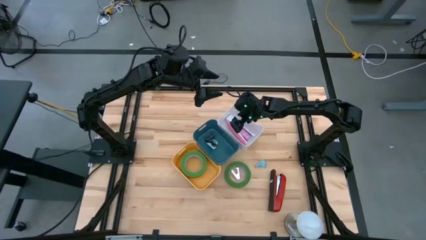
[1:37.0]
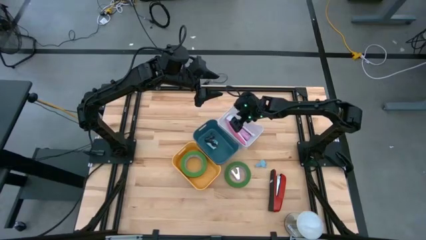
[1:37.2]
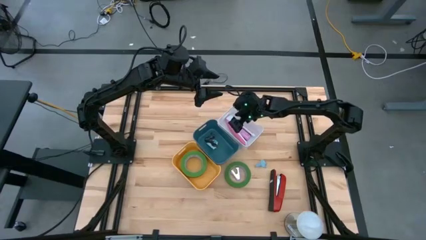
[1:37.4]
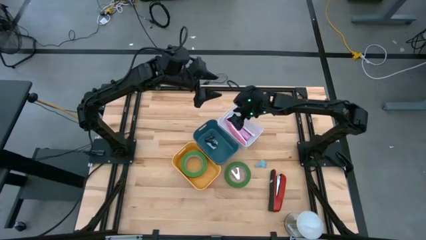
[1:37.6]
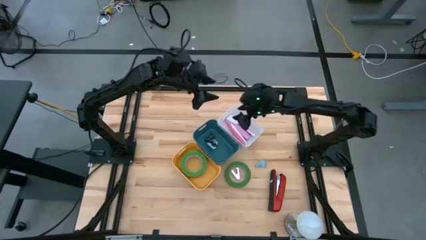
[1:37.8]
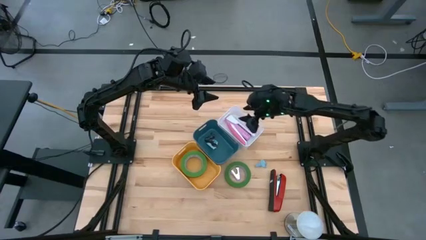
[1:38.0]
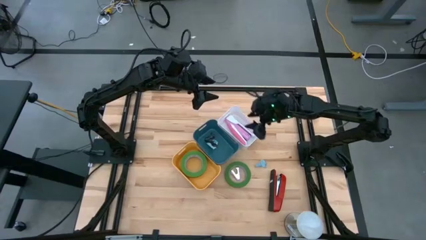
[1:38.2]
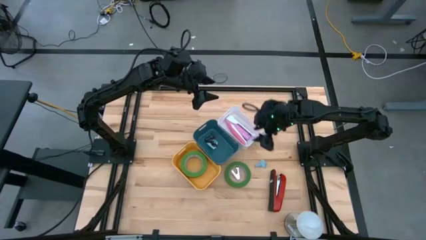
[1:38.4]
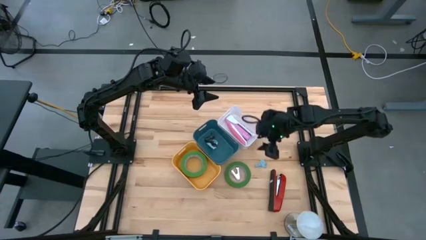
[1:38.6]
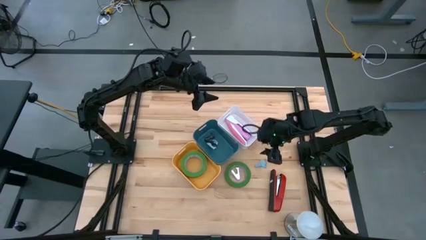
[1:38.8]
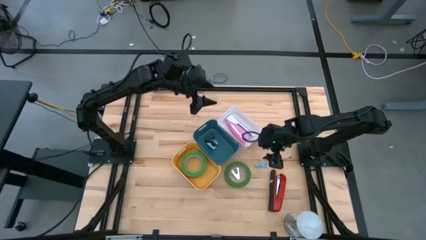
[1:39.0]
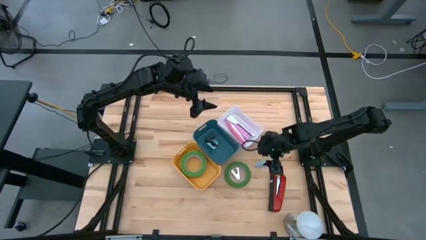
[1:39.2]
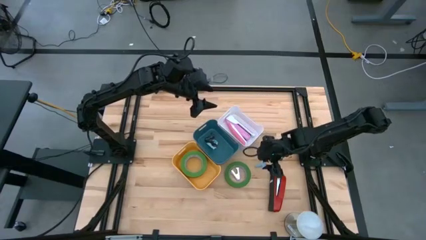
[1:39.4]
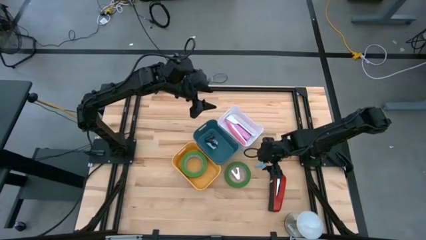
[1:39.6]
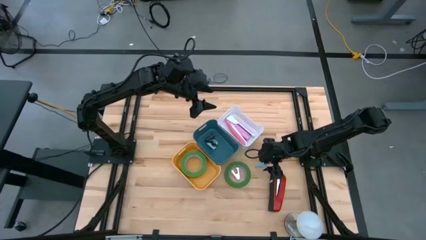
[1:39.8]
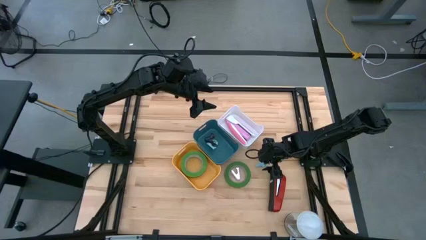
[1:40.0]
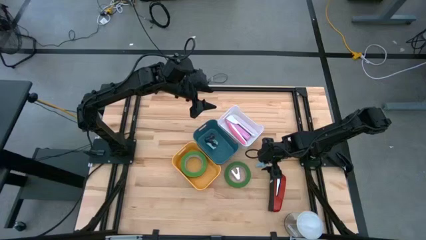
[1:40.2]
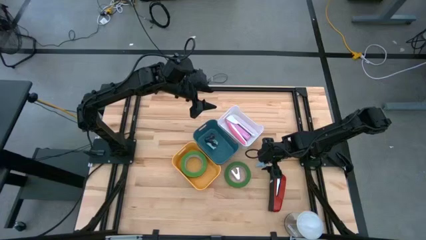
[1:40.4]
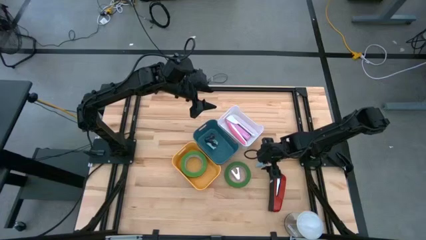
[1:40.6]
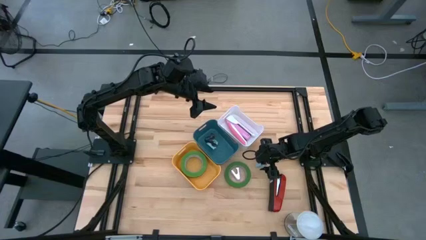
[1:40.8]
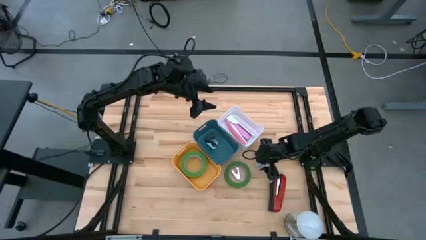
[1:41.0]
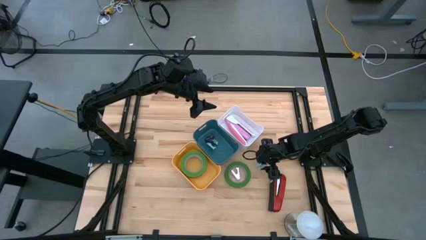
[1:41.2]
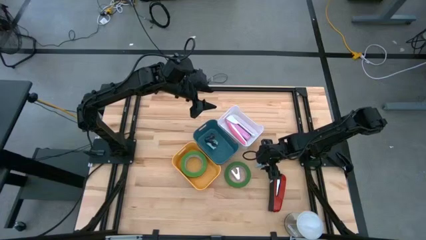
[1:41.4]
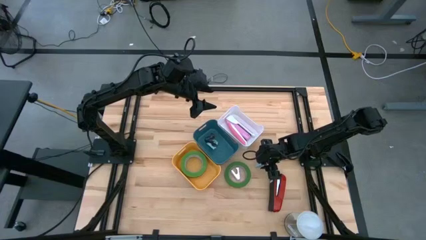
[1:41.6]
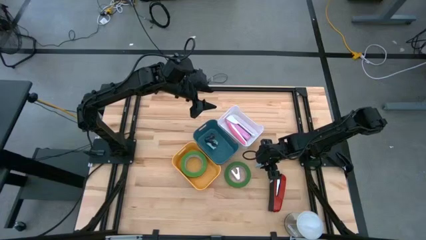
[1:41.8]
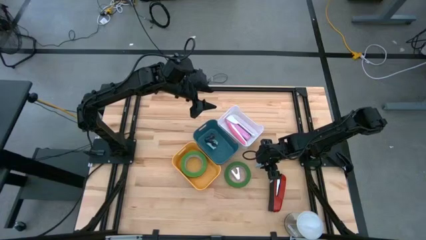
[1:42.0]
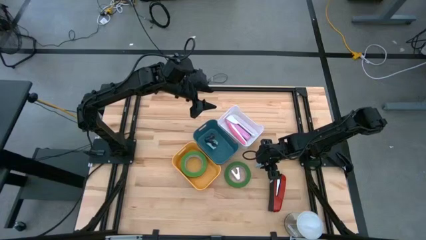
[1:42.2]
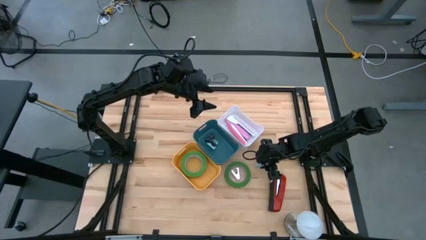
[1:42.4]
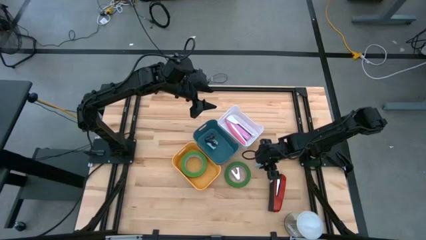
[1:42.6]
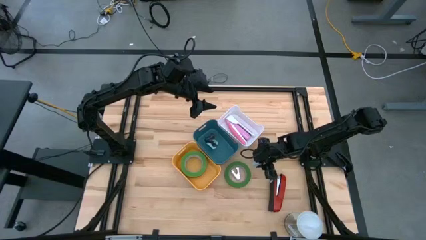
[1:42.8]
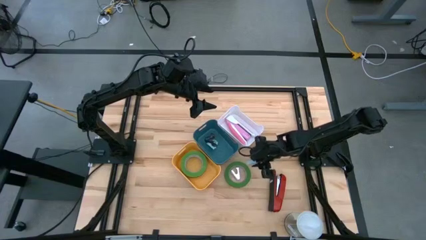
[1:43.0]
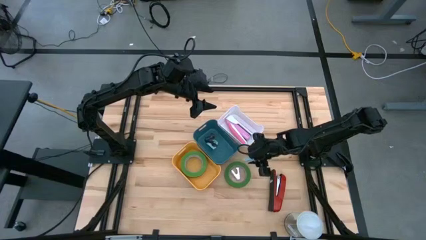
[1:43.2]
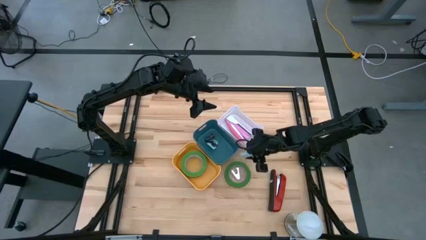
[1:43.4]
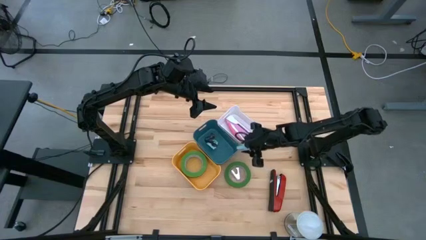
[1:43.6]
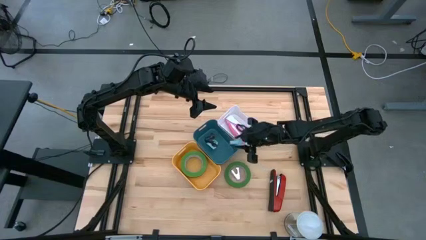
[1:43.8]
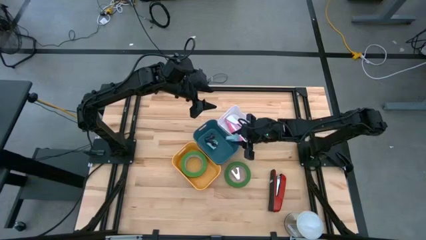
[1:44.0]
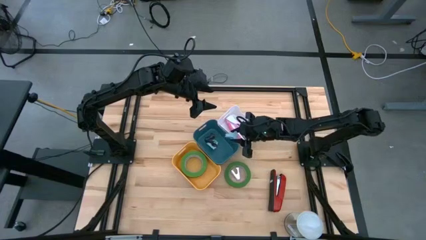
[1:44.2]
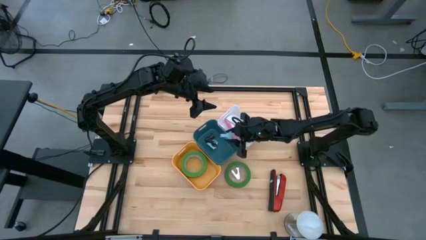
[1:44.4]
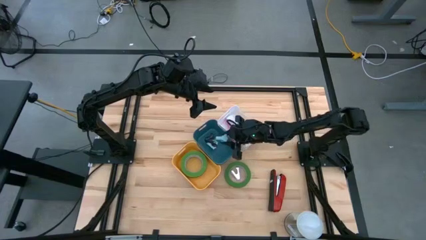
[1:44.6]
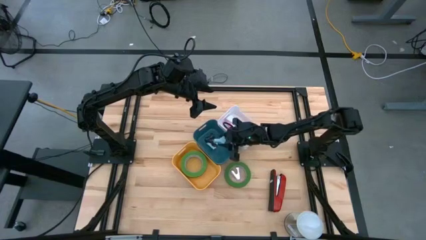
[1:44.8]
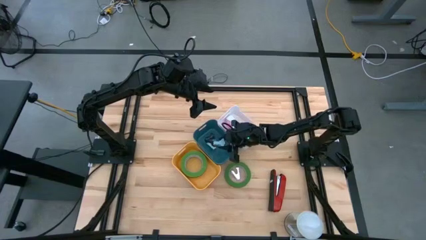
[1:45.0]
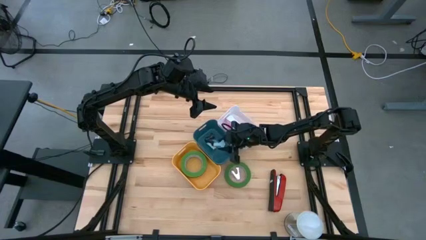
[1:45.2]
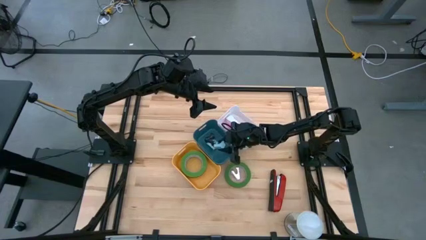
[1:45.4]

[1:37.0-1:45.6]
Task: Pick and place Stapler, Stapler remover, tape
Put the light blue staple remover into the blue bin

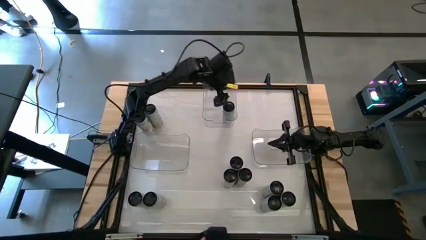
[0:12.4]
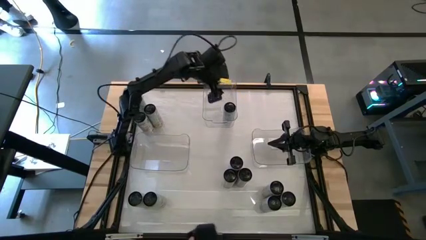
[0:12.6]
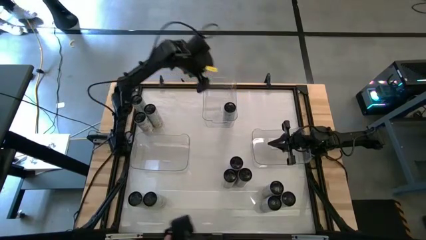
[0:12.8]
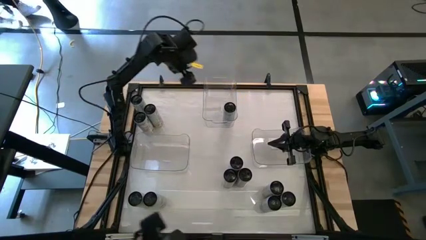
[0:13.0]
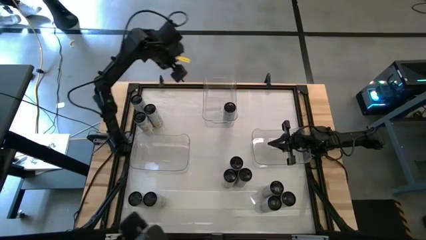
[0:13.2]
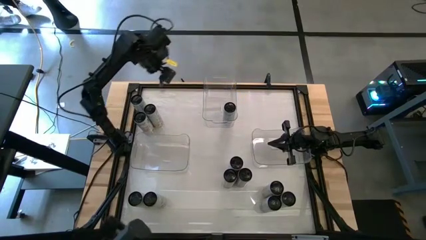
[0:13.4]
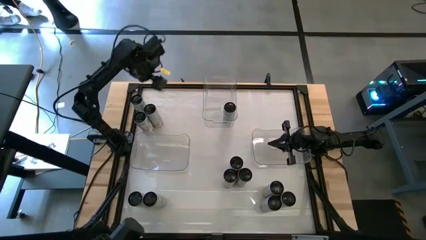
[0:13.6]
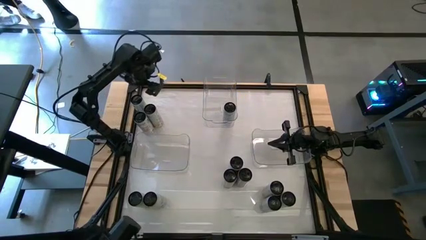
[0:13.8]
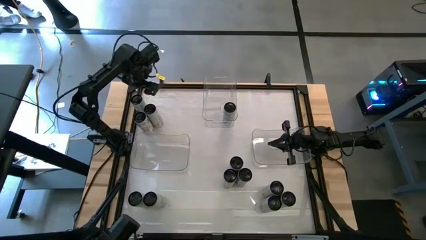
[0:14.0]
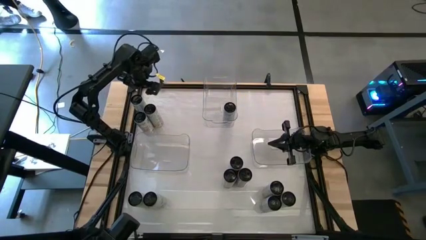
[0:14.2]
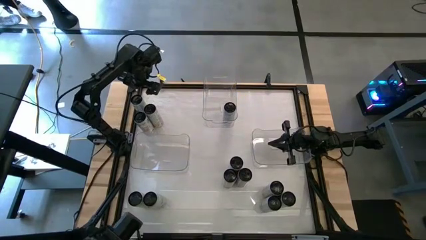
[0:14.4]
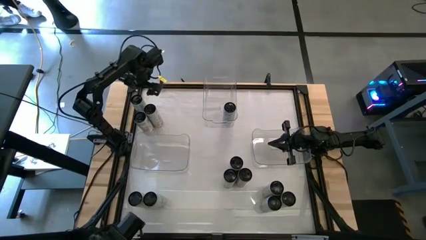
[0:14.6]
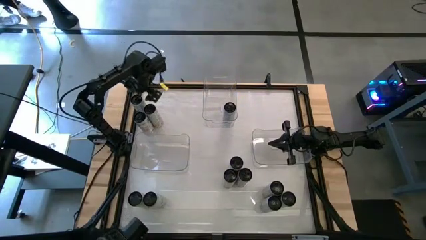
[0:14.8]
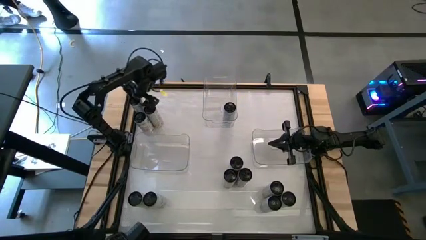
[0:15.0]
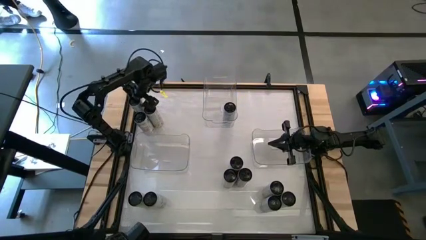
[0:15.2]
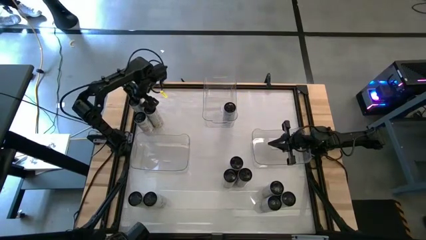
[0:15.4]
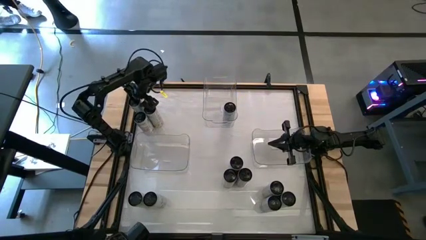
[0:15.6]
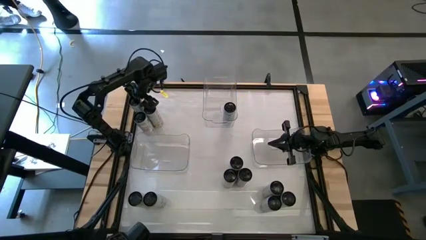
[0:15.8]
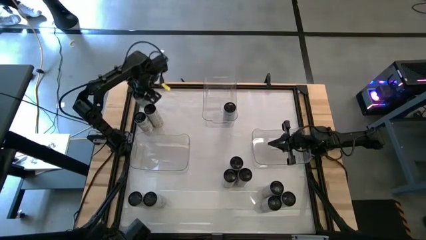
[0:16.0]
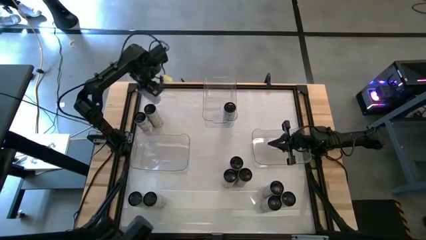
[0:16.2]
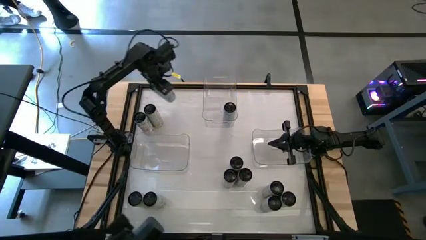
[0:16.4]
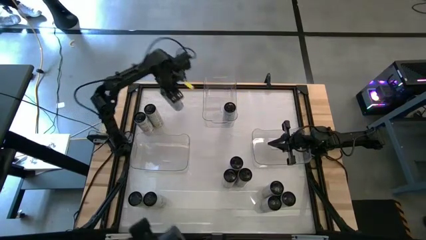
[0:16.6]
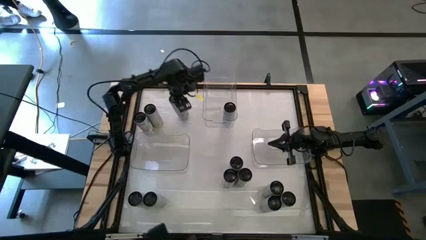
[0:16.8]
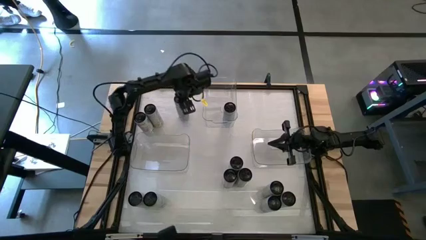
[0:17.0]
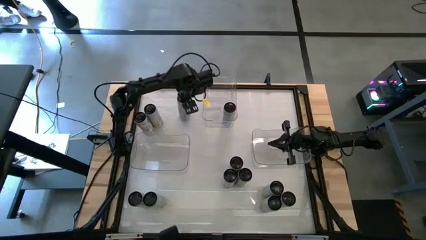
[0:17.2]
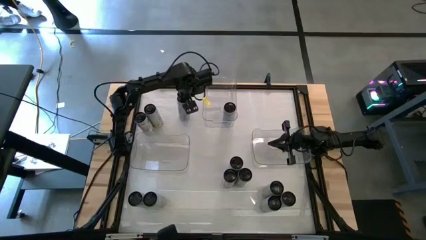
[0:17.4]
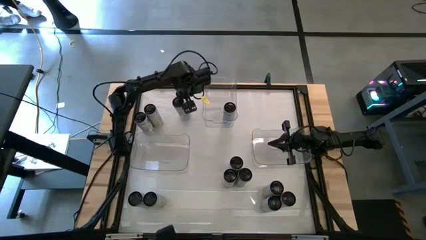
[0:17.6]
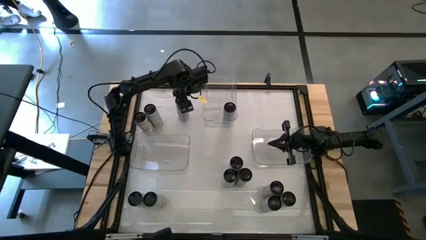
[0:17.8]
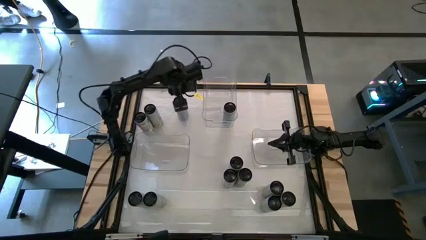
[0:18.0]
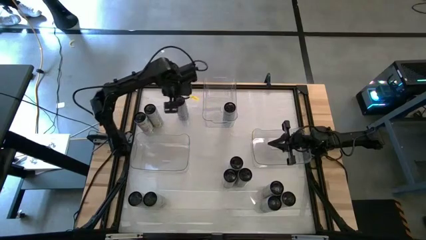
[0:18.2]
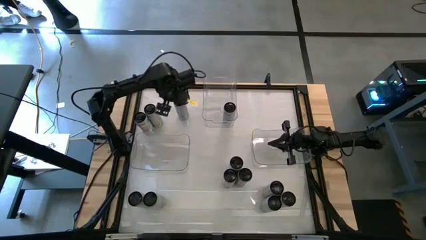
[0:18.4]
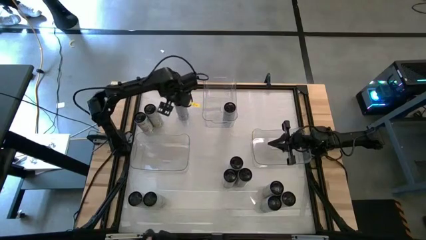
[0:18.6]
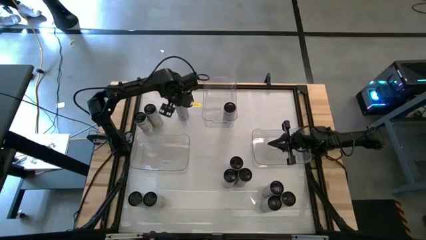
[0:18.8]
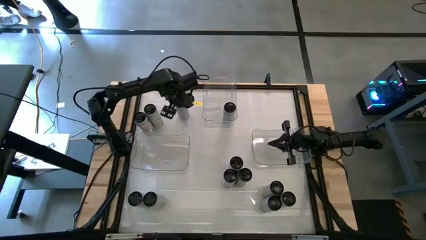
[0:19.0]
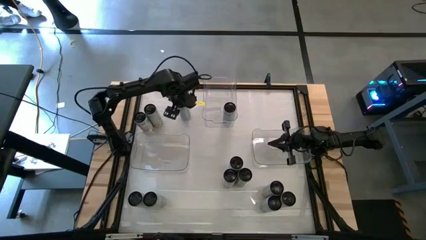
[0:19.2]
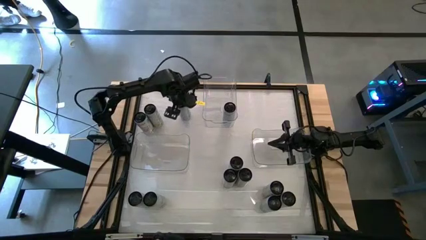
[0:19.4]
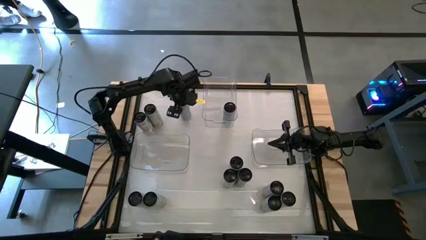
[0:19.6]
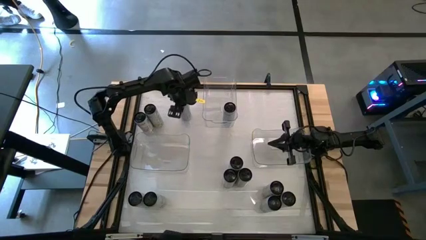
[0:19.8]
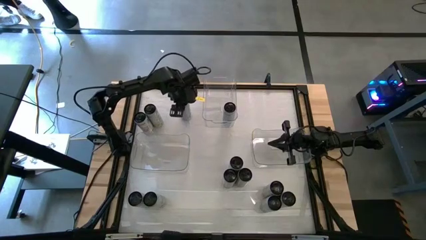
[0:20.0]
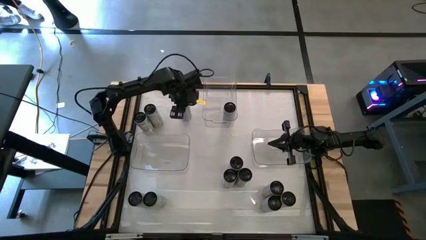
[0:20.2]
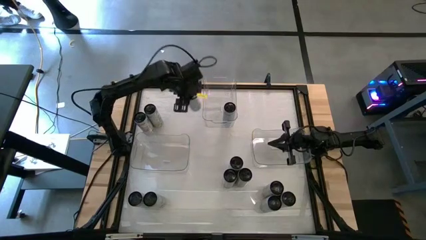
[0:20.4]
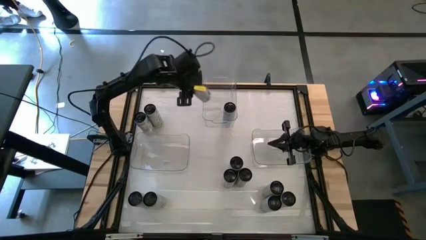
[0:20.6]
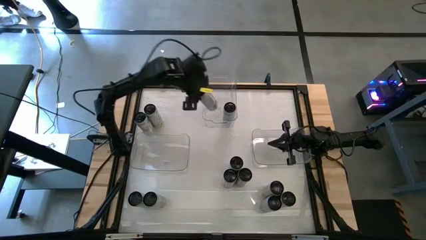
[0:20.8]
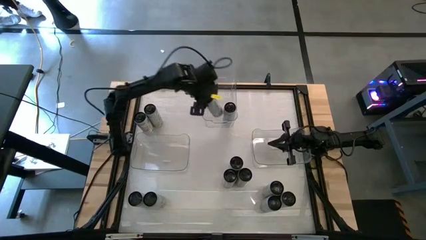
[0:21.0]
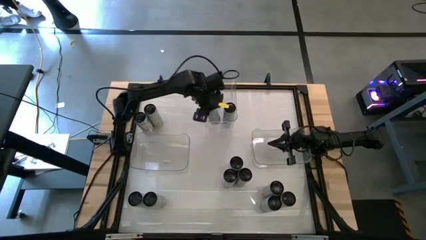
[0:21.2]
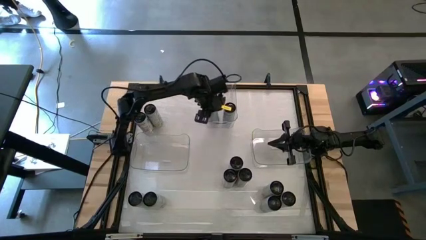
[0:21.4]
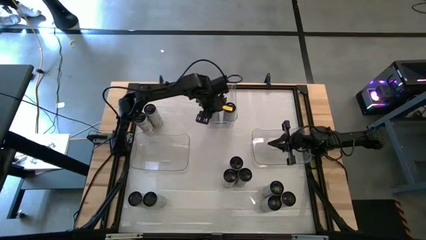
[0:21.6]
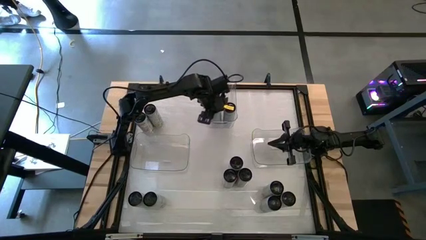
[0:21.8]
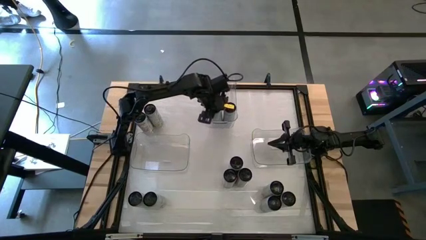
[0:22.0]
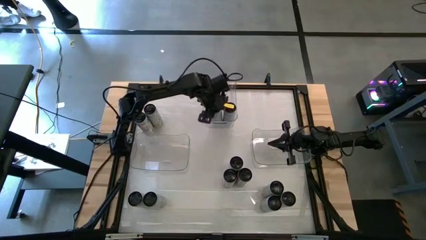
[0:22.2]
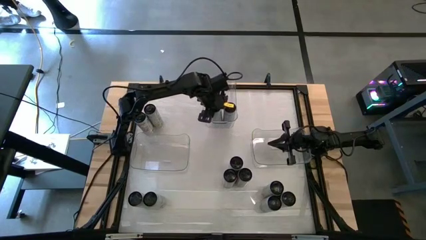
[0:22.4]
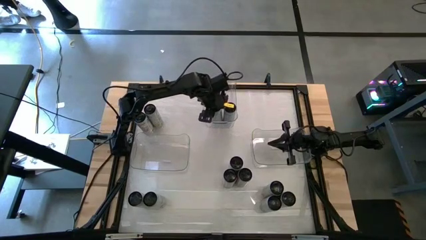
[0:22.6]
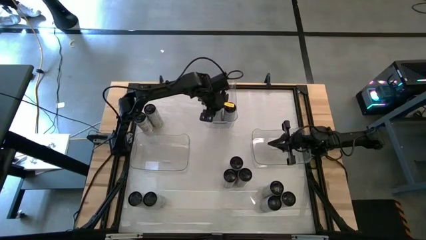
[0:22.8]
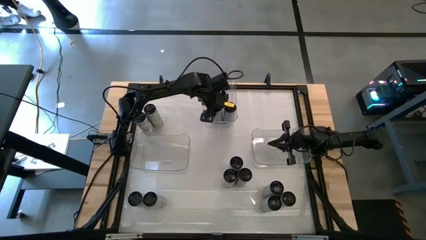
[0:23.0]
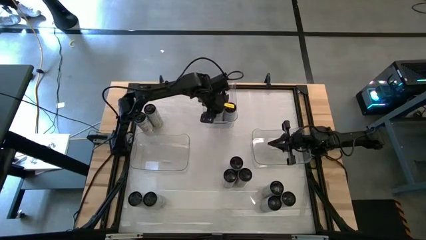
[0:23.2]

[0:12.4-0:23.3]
Task: Sort soda cans
Put the top left white-blue soda can into the top middle transparent bin
